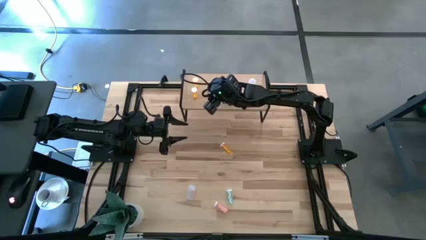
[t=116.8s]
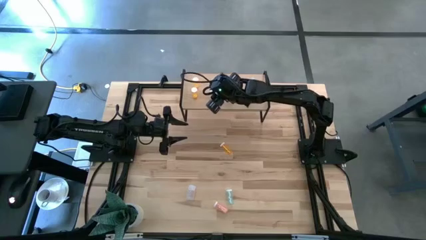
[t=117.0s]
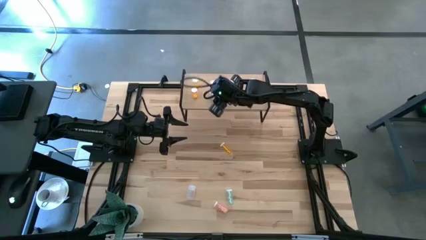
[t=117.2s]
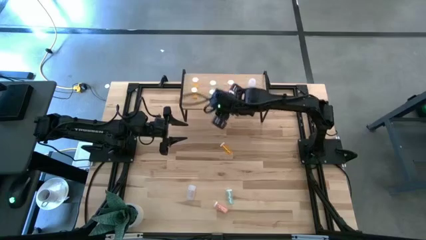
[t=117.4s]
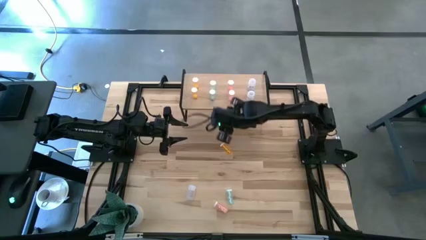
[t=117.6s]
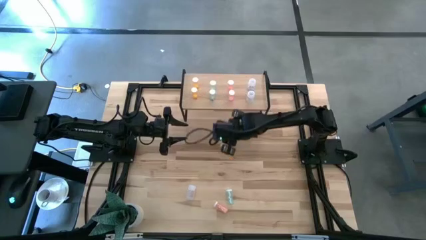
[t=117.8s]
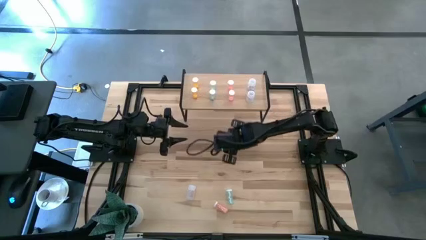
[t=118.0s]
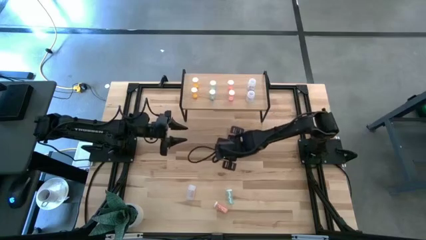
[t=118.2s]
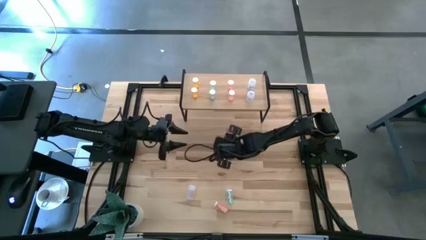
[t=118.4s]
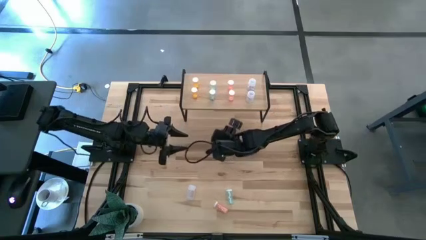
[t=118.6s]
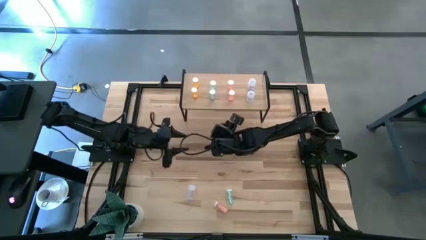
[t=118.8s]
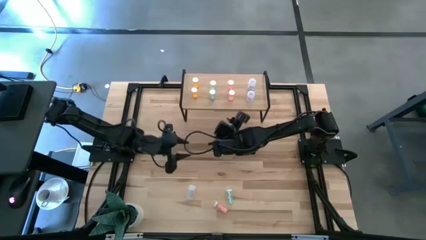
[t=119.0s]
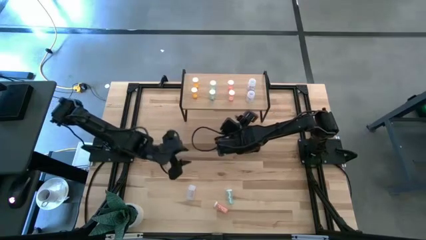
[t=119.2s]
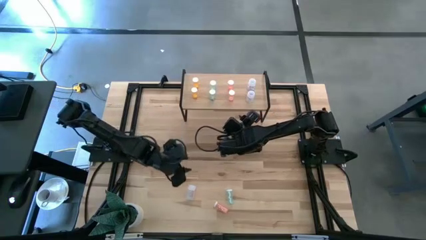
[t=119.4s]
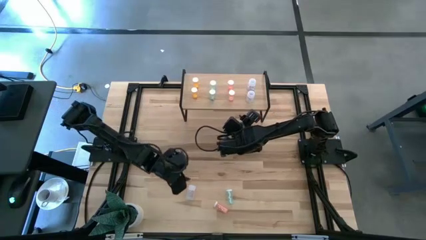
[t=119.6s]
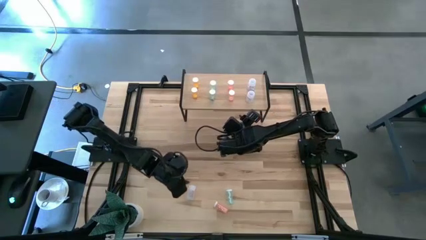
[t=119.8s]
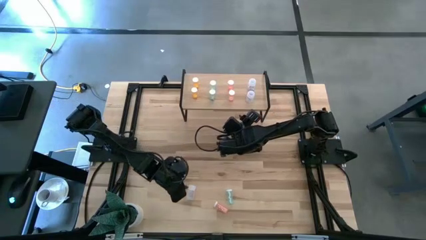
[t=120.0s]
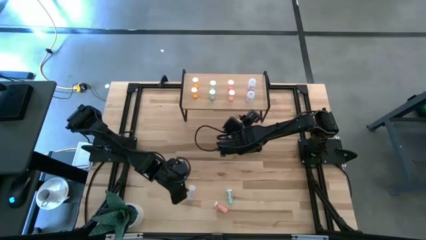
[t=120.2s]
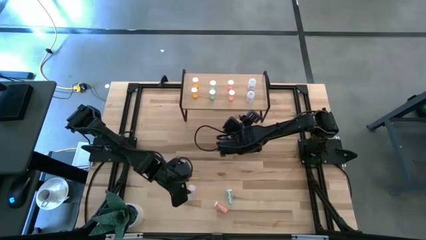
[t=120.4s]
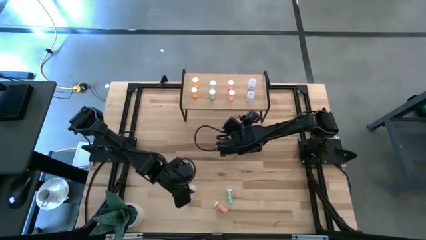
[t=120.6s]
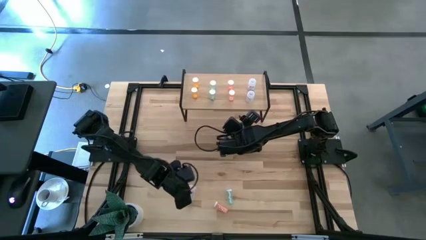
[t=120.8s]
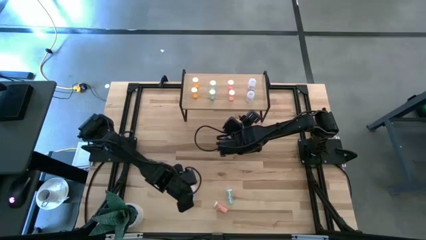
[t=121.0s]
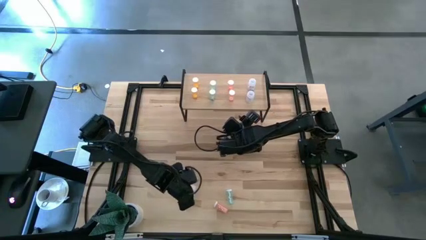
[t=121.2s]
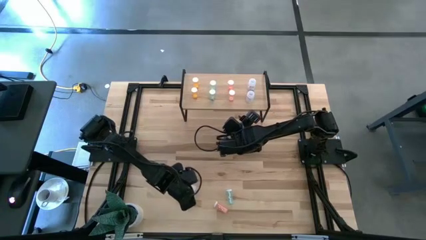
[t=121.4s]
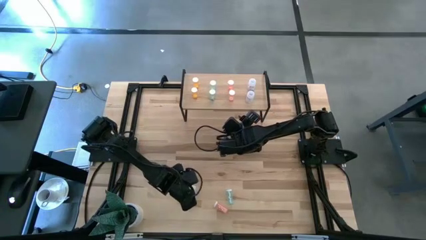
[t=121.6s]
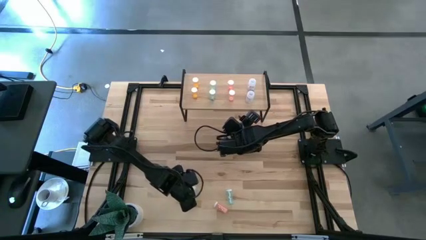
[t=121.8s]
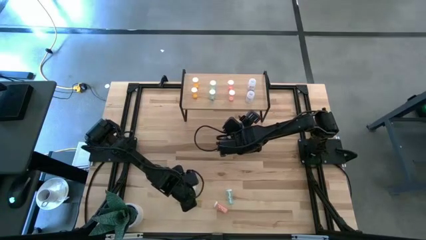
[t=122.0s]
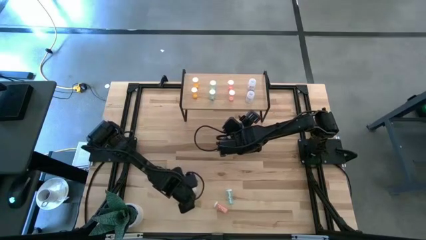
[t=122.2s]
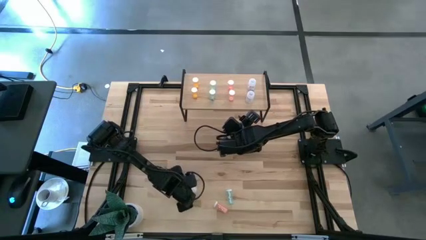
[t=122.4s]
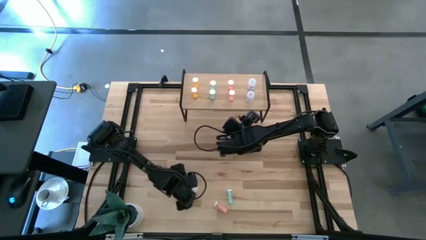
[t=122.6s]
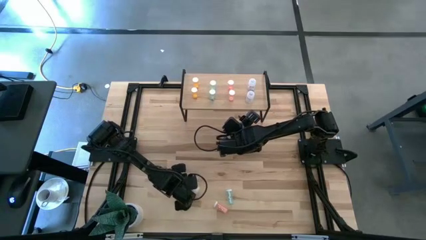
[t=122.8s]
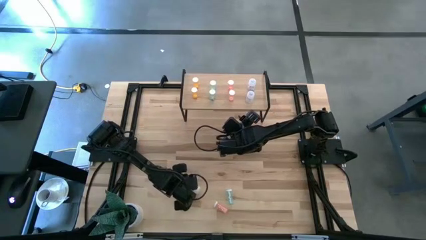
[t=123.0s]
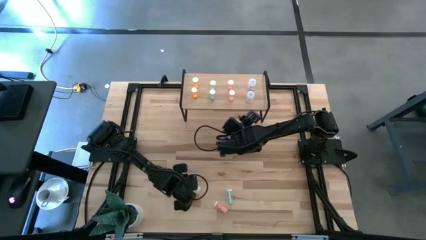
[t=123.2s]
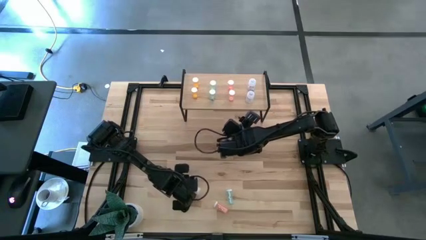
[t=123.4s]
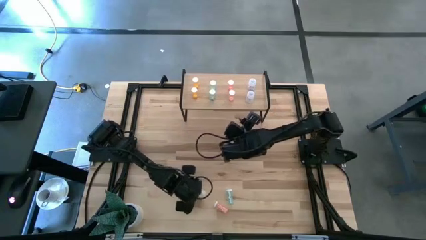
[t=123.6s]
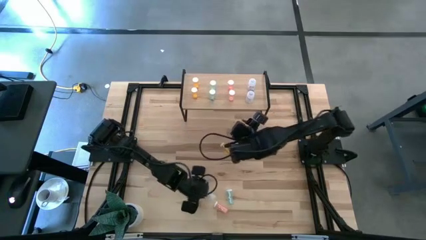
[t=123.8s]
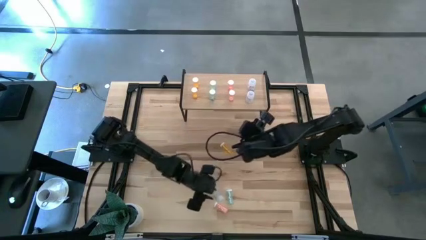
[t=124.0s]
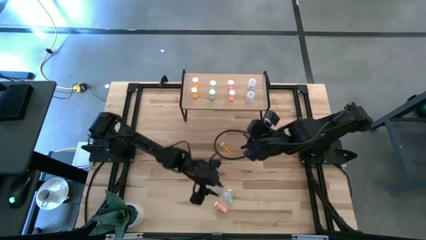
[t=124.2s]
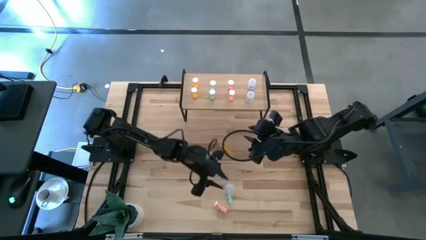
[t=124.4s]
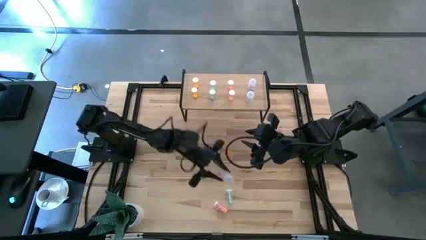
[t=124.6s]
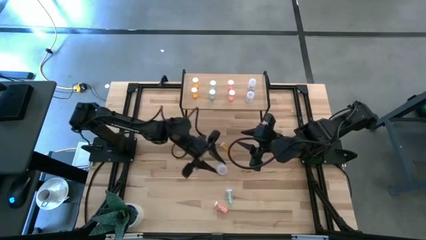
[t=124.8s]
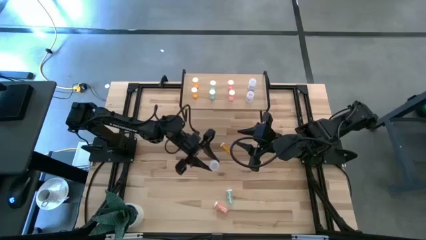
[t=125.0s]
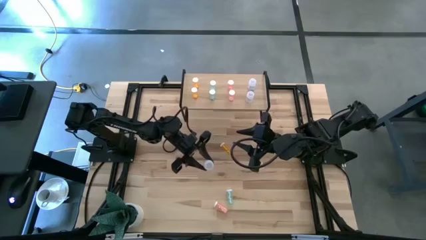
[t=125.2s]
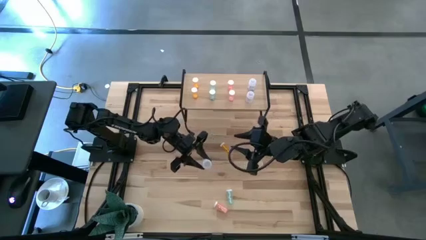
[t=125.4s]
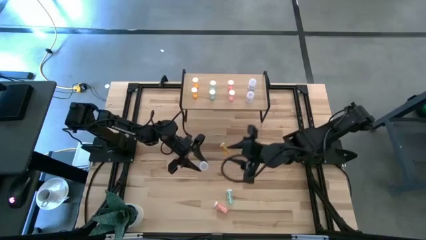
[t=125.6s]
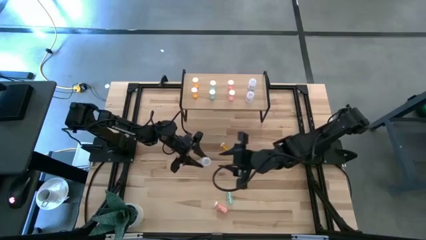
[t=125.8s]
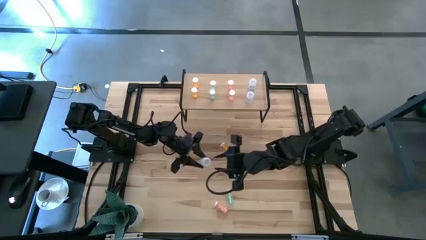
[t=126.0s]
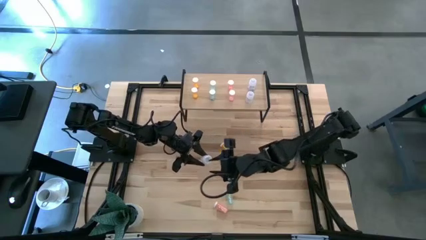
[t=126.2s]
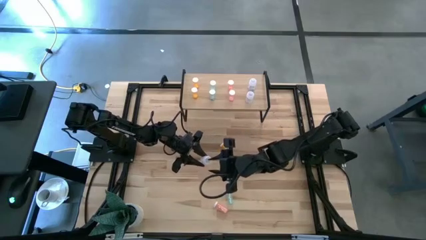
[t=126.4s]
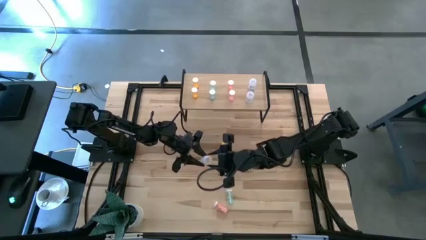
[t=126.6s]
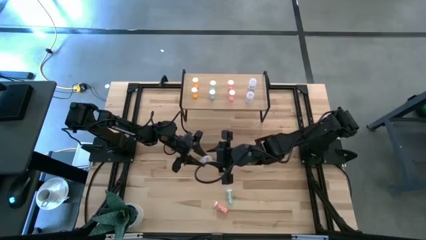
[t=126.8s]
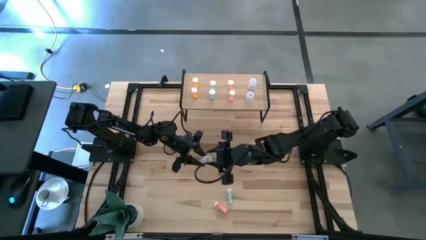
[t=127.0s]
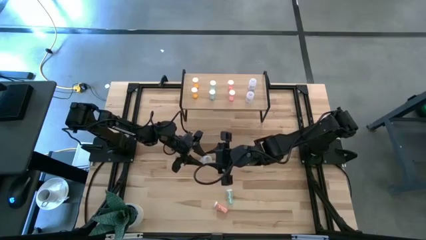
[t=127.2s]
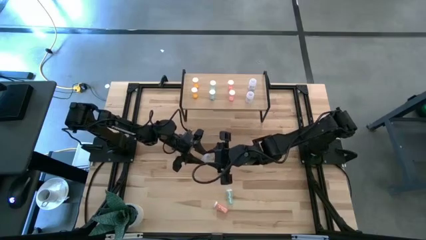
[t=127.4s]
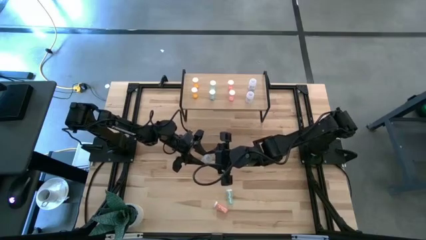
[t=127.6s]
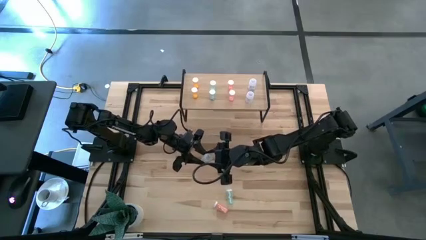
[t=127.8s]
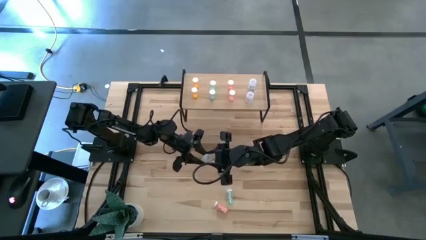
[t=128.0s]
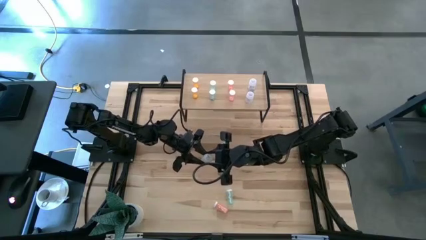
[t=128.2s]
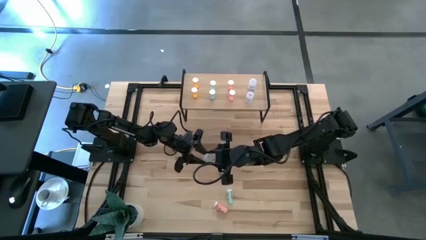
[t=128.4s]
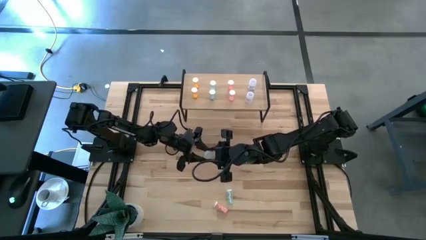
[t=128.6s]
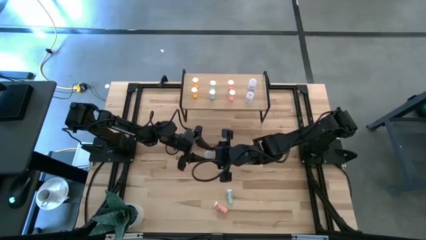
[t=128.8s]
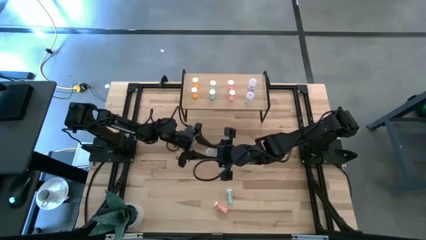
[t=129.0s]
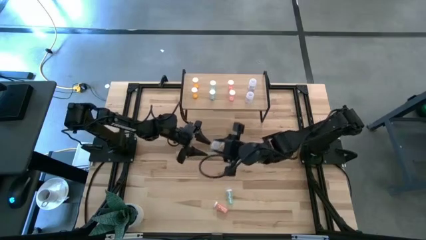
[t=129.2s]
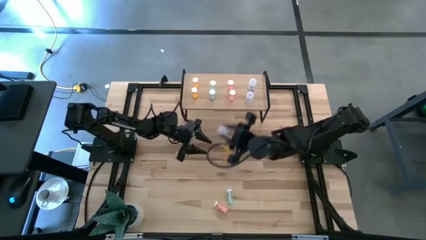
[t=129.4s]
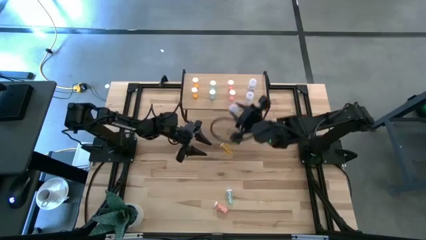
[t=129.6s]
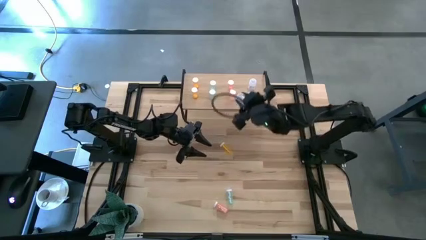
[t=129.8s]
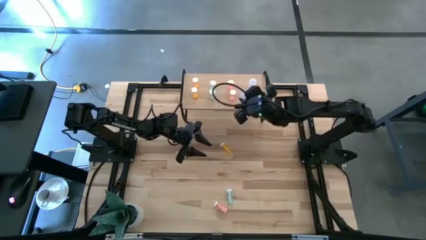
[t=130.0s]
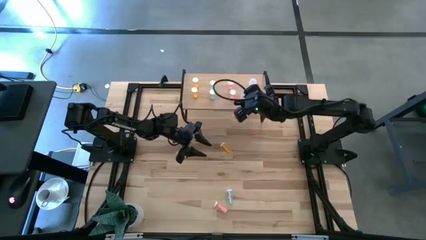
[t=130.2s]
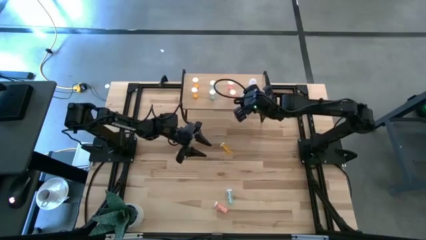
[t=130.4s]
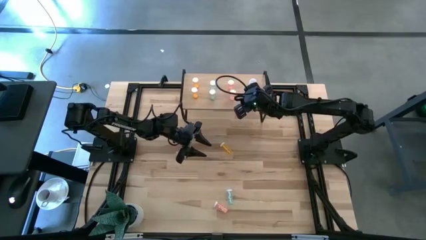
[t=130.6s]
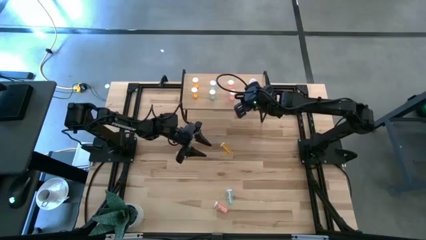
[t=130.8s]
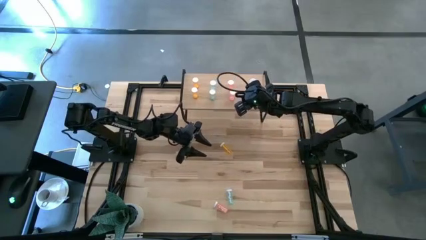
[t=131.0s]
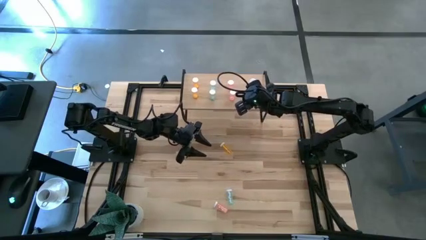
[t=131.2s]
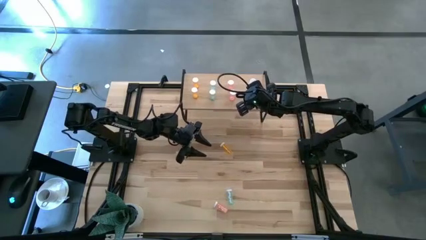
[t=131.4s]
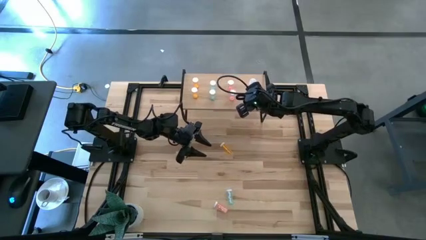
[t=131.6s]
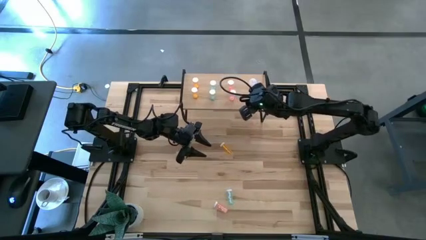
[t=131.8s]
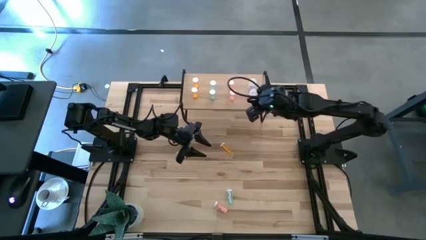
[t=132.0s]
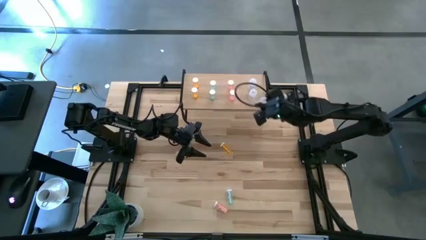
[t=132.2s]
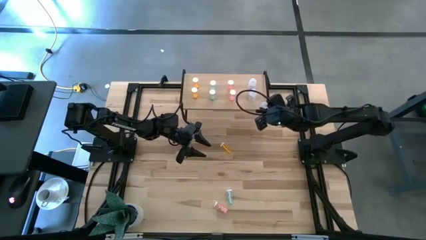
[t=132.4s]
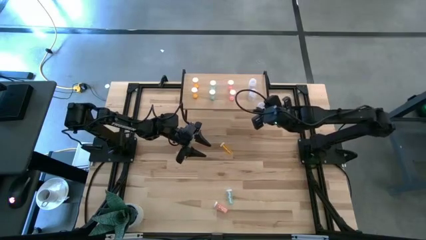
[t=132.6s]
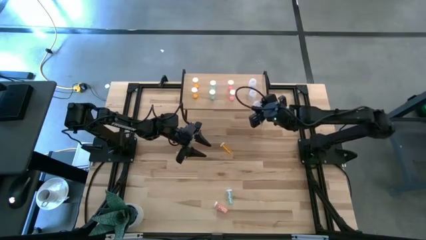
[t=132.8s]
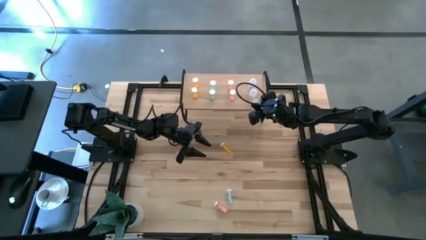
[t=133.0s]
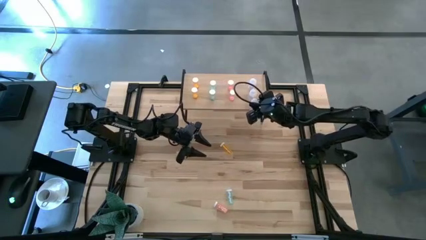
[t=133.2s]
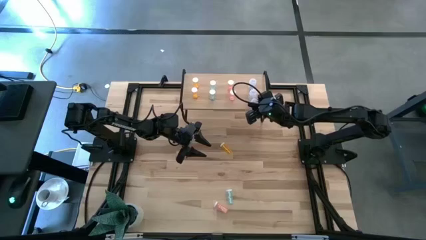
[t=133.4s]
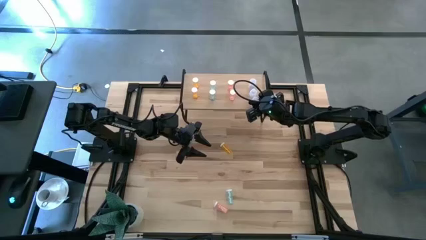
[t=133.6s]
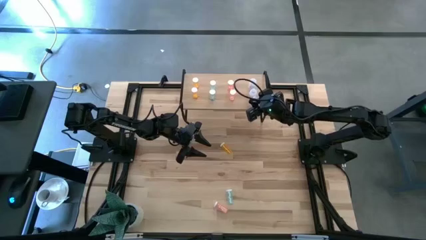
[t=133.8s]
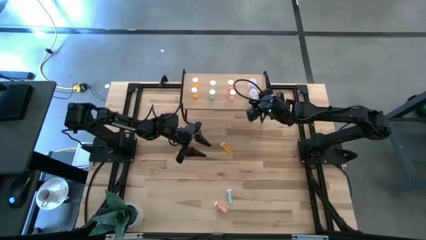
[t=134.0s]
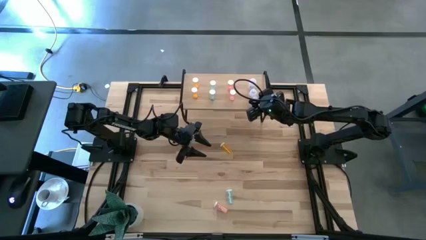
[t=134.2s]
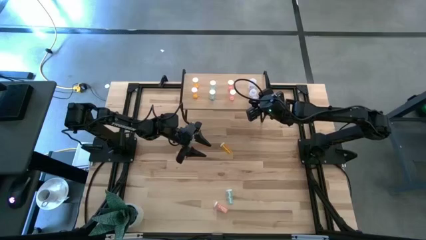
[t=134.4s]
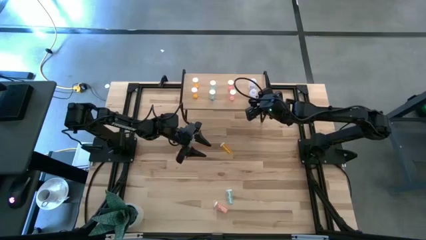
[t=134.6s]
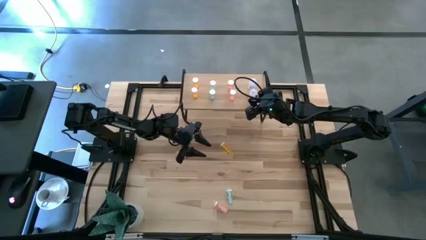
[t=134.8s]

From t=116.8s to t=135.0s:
Task: Pick and place medicine bottles onto shelf by color
Put the transparent pill bottle on the shelf aligned with the transparent pill bottles
